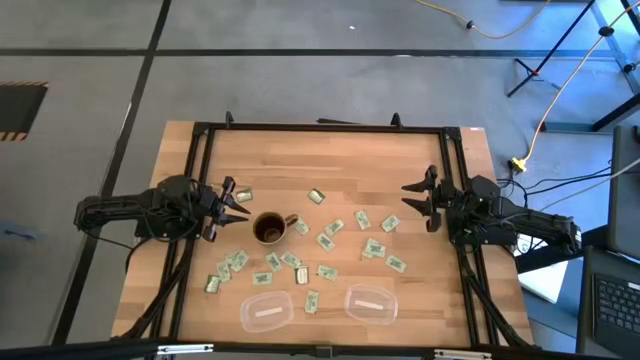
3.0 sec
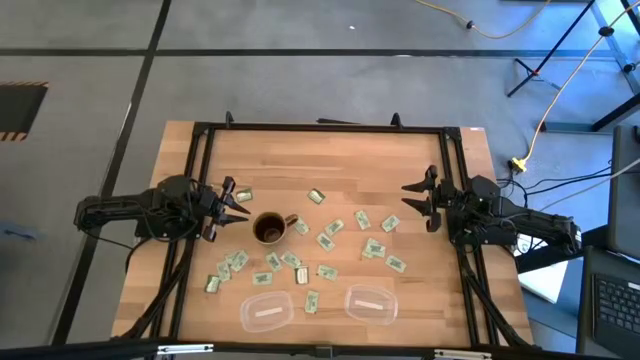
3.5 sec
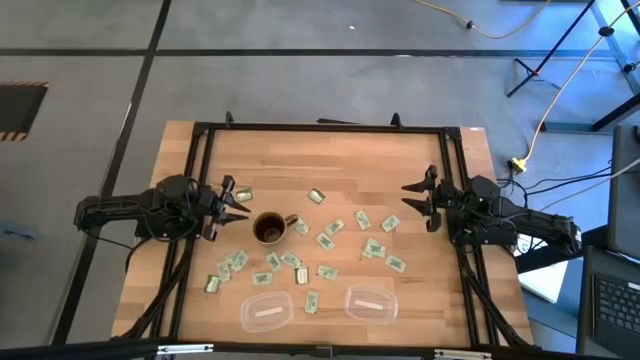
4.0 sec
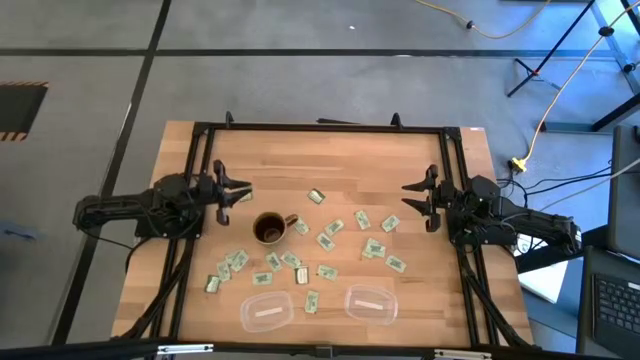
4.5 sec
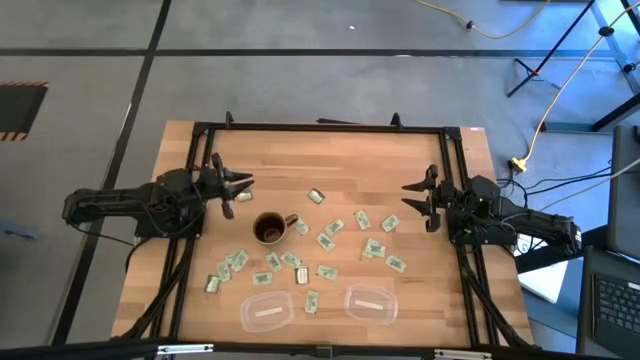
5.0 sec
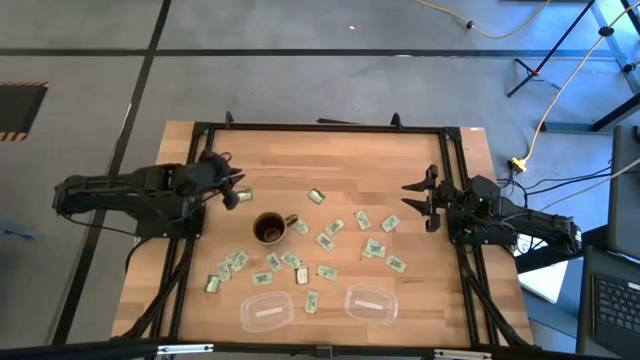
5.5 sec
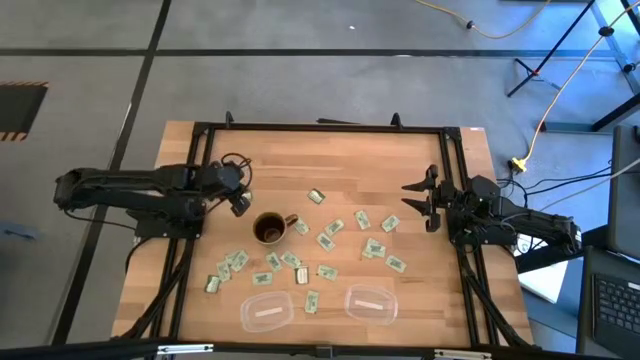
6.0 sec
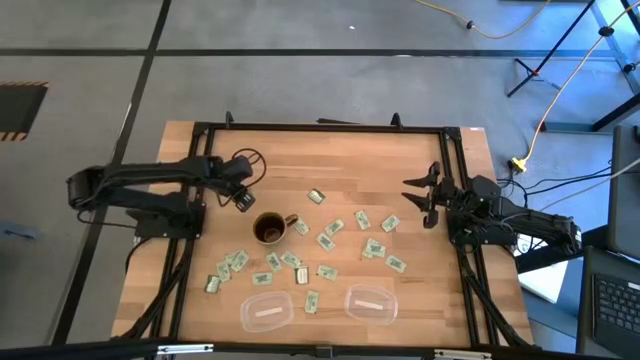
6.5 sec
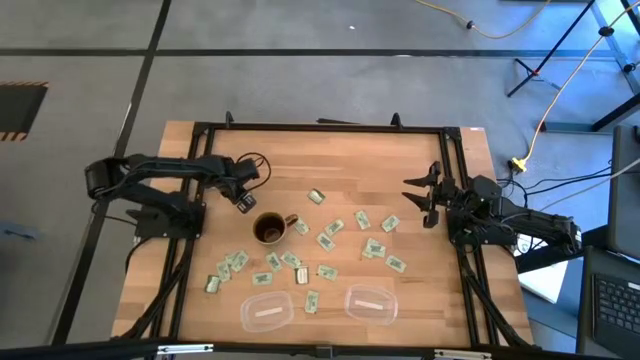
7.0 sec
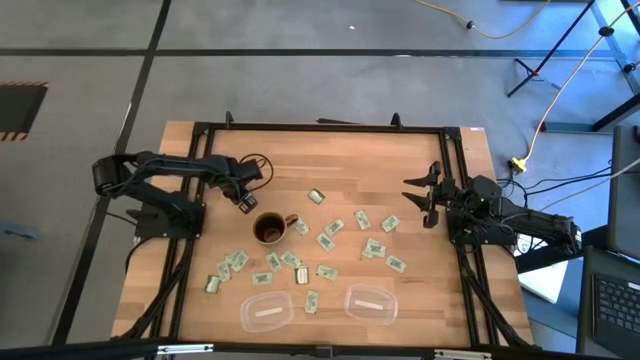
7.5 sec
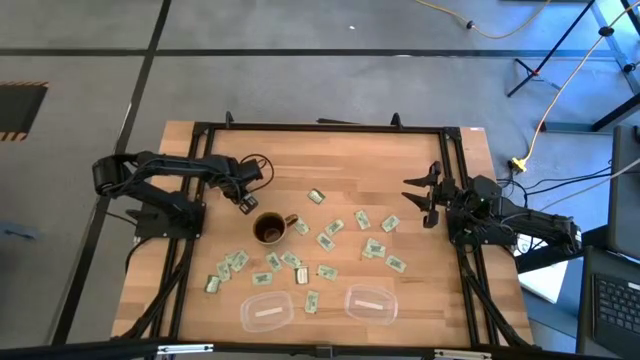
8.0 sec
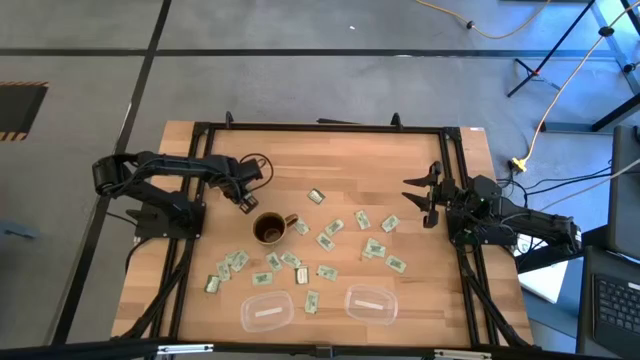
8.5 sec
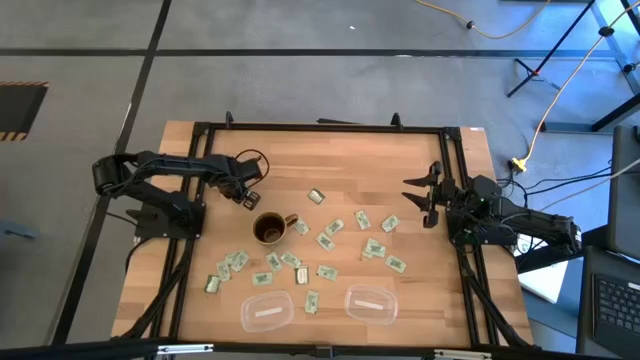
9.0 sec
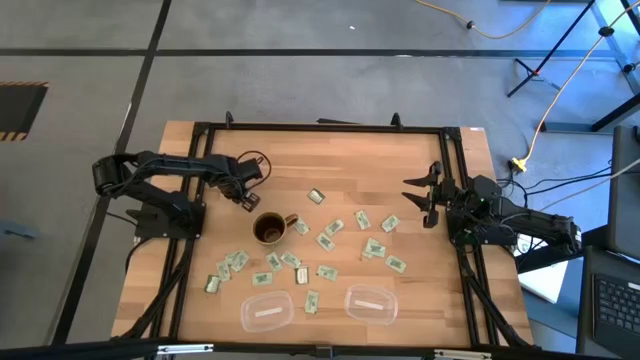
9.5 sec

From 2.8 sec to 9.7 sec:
Task: Pick and place items into bin
Put the green stevia packet into the left transparent bin

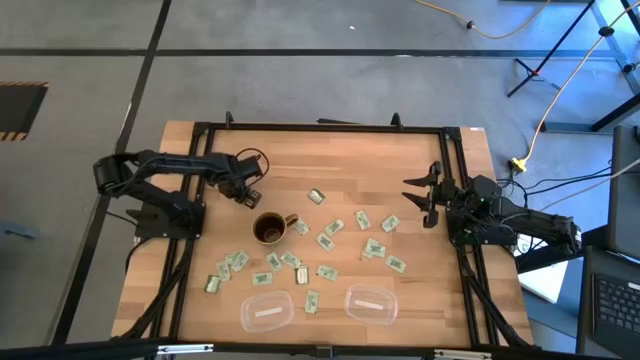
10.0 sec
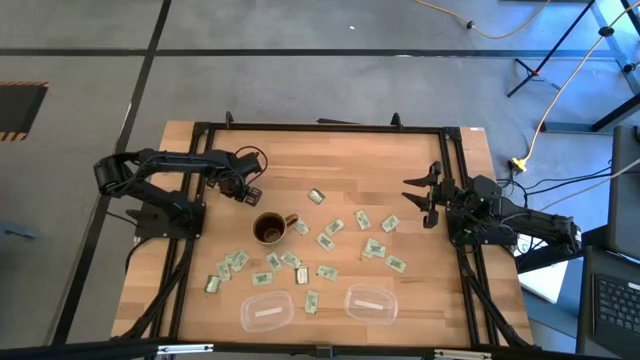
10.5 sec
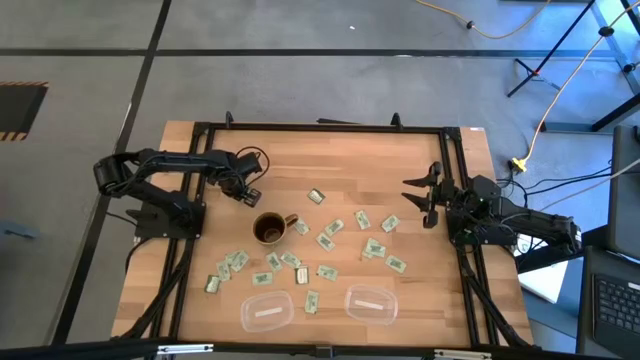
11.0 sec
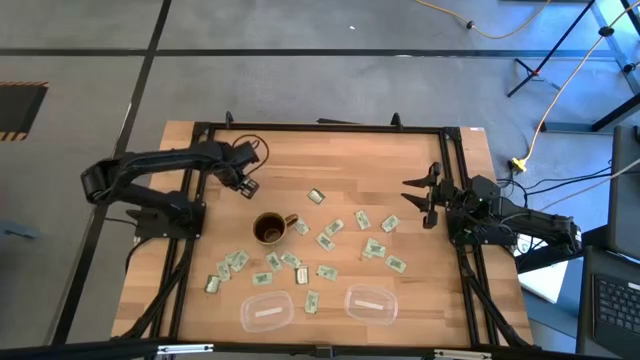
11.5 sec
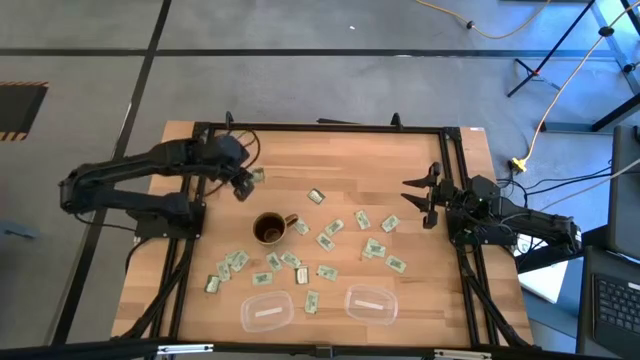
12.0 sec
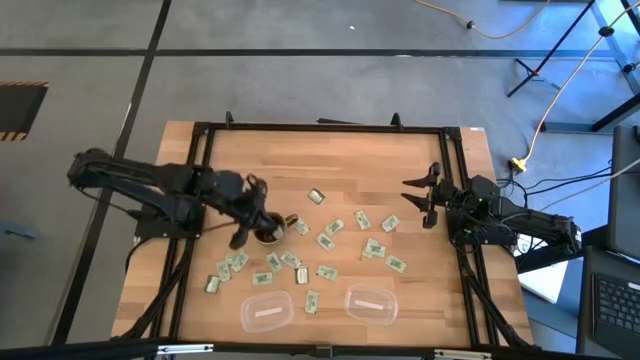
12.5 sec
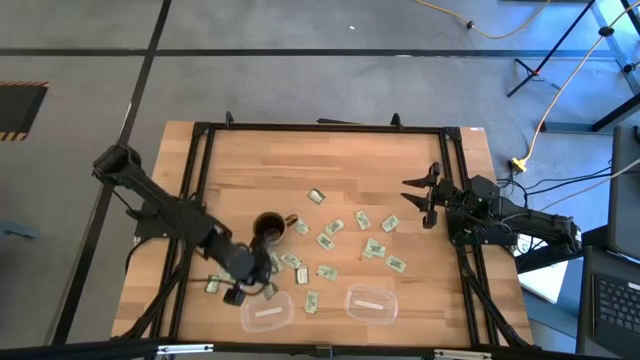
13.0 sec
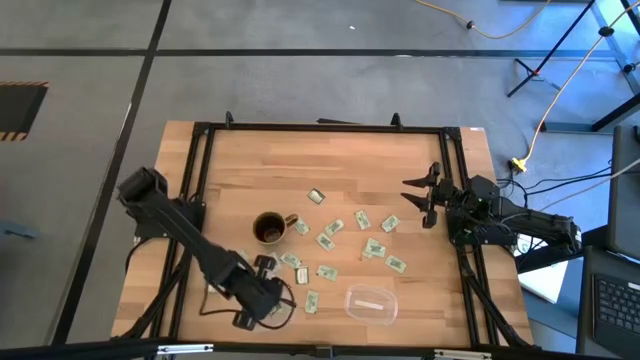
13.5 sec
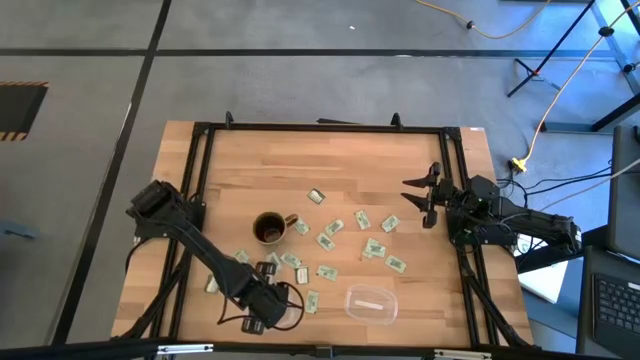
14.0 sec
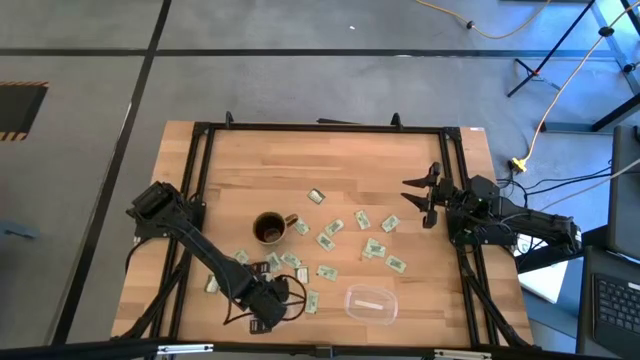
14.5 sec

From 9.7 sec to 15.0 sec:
Put the green stevia packet into the left transparent bin

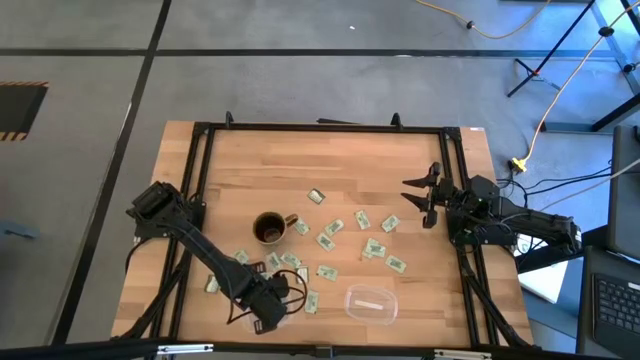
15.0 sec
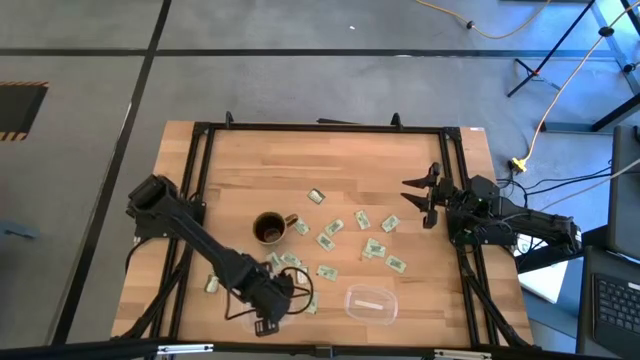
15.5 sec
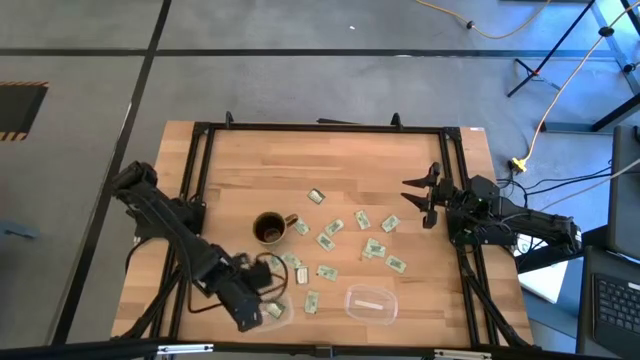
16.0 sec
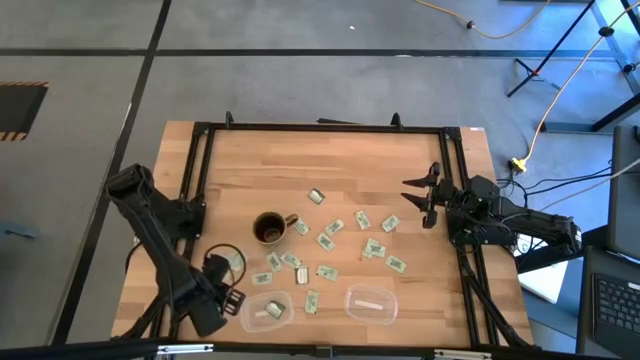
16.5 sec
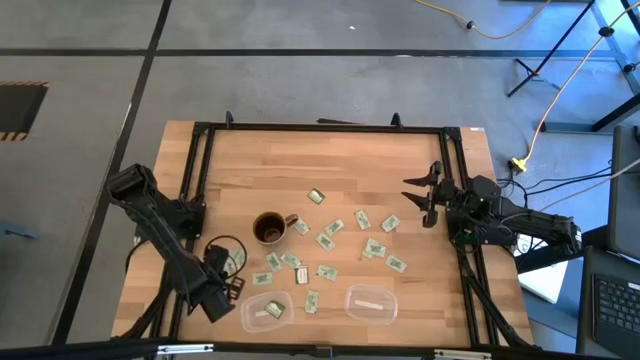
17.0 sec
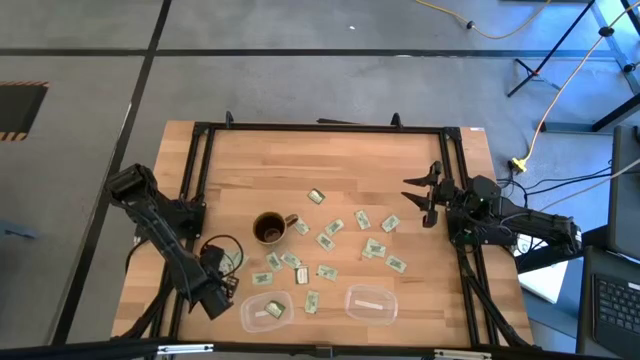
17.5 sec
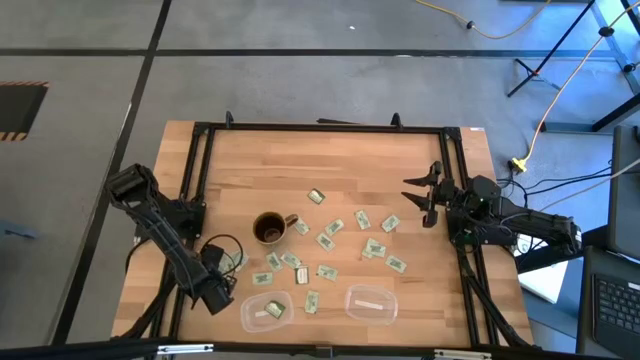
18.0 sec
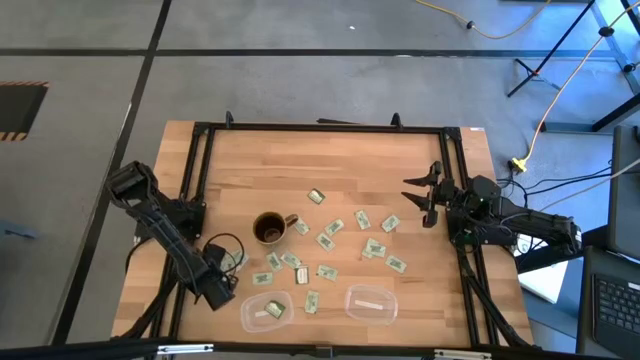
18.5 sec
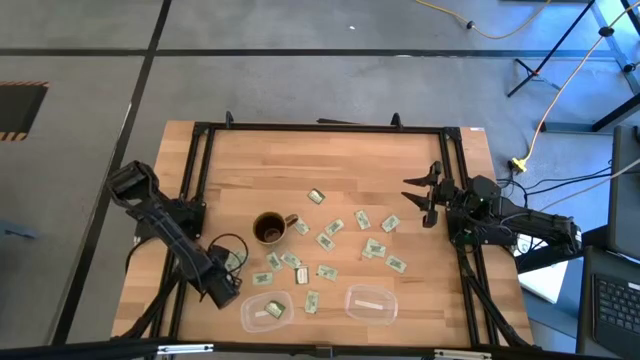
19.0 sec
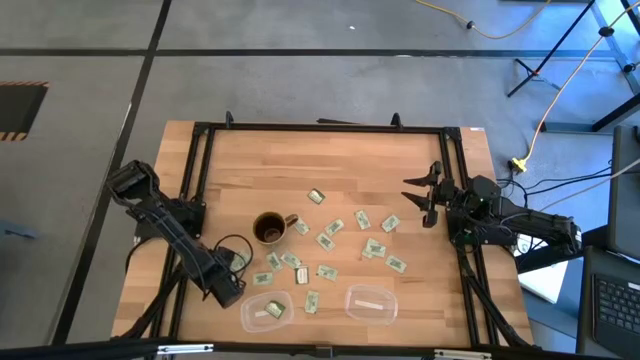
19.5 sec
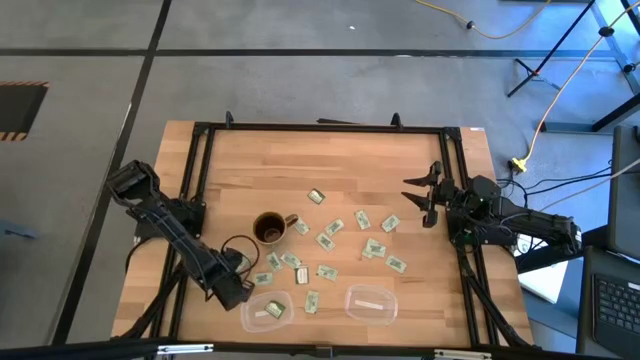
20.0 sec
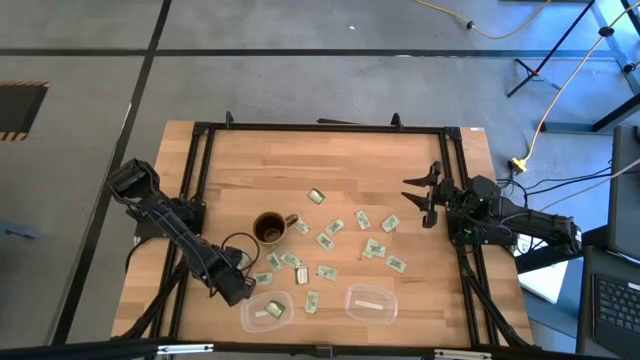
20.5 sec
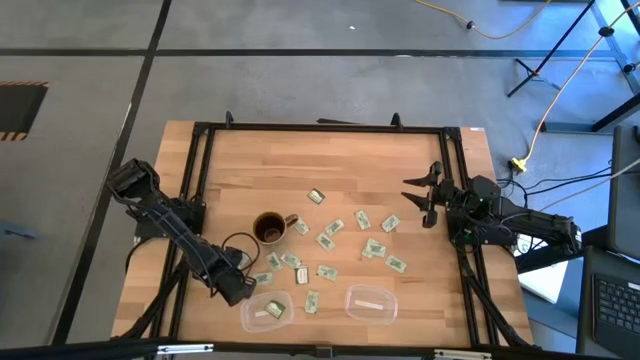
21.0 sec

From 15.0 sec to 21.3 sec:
Put the green stevia packet into the left transparent bin

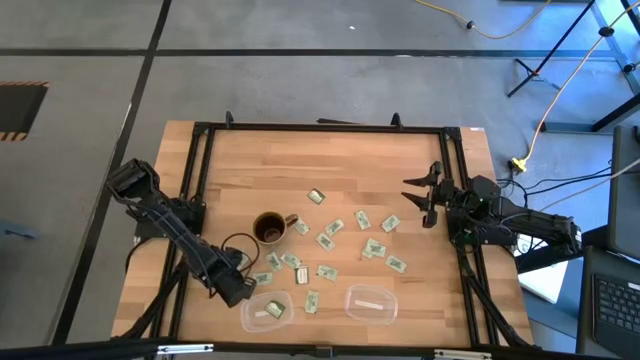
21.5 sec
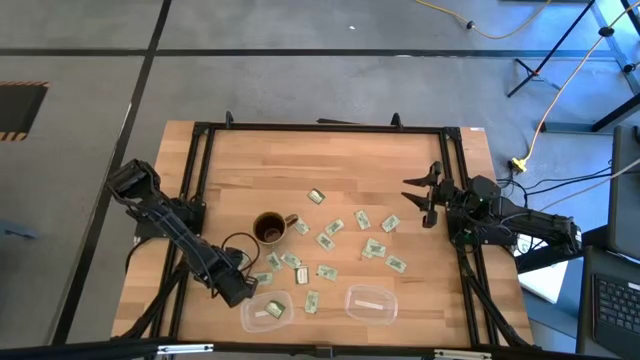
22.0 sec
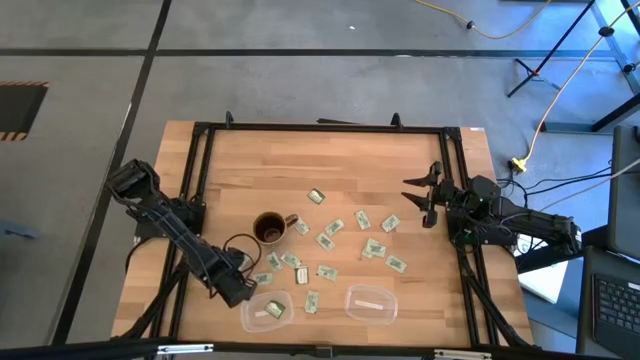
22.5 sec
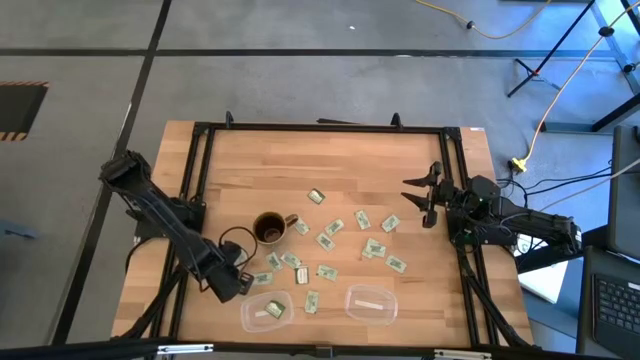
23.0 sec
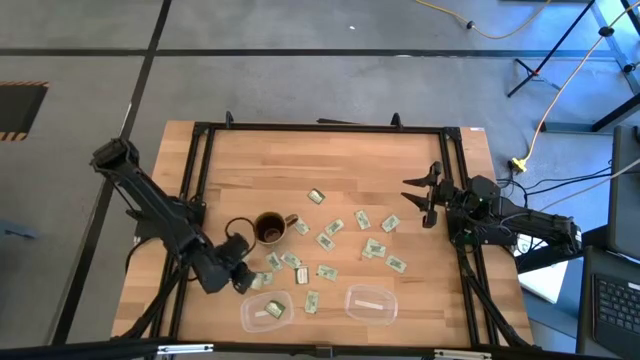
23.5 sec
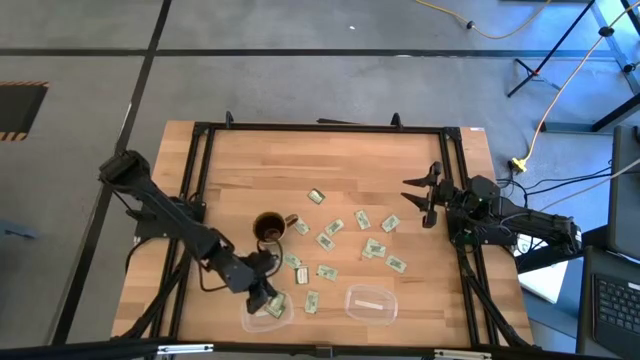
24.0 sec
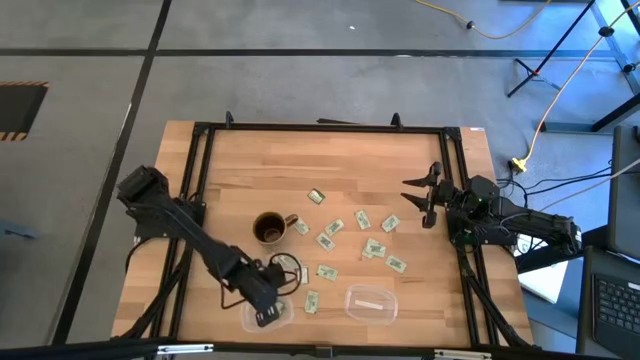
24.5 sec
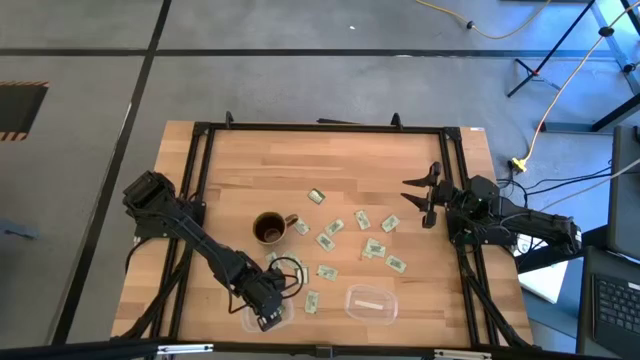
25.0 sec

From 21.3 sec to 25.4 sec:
Put the green stevia packet into the left transparent bin
